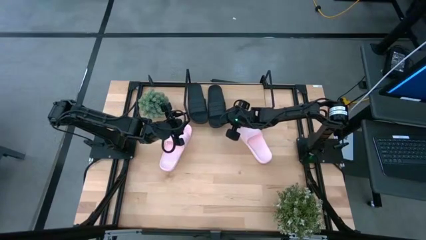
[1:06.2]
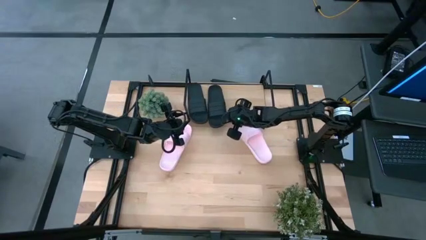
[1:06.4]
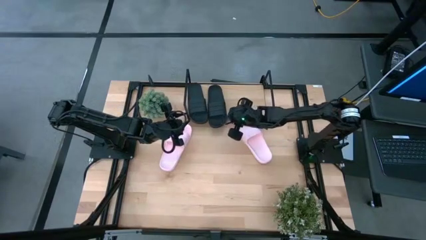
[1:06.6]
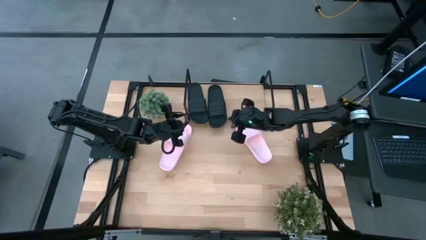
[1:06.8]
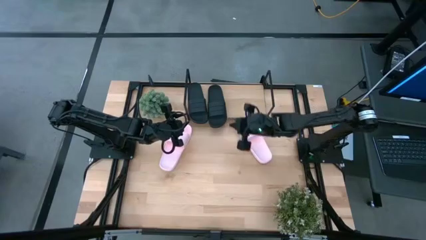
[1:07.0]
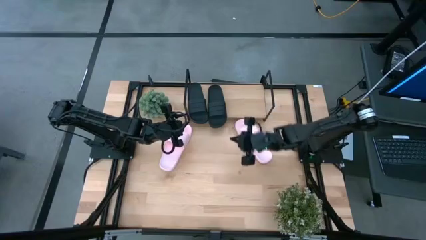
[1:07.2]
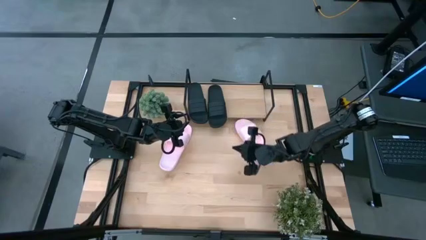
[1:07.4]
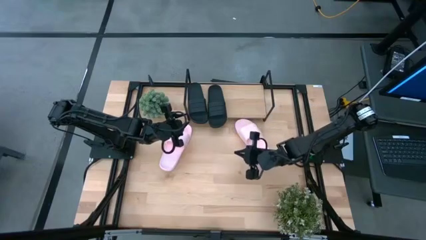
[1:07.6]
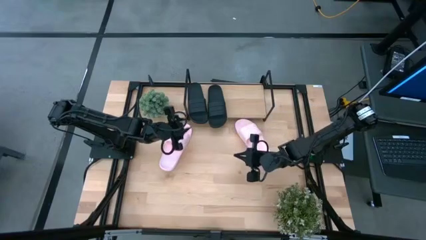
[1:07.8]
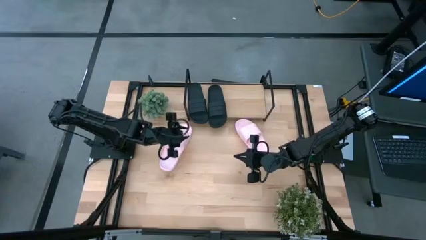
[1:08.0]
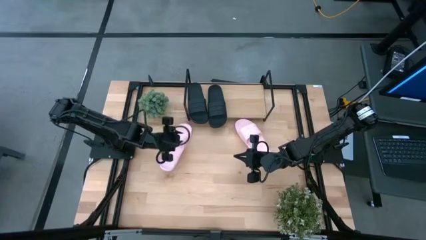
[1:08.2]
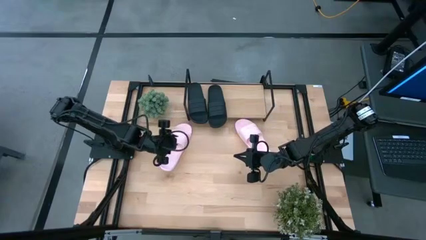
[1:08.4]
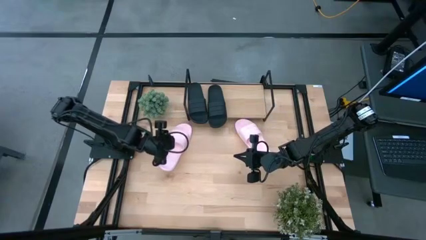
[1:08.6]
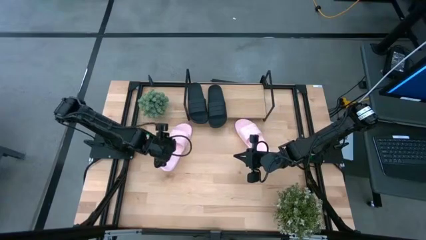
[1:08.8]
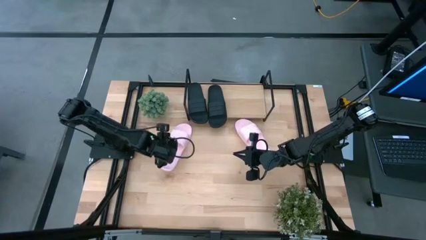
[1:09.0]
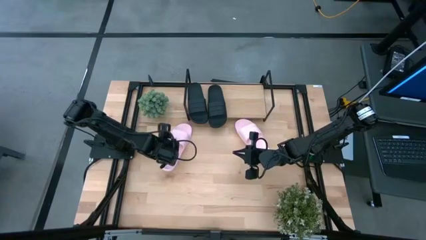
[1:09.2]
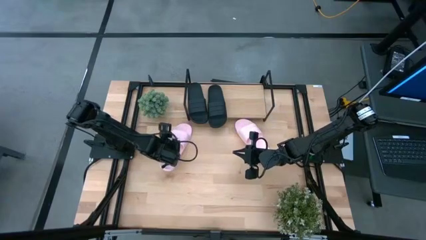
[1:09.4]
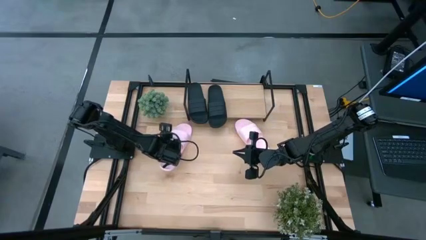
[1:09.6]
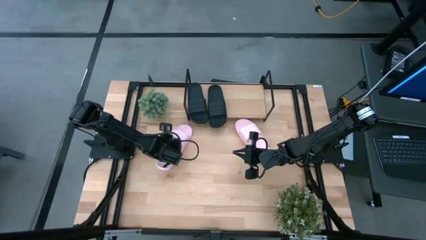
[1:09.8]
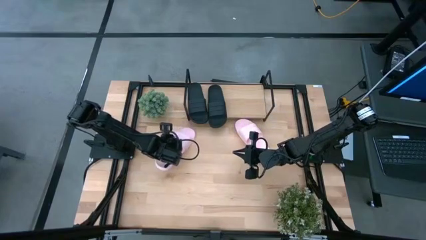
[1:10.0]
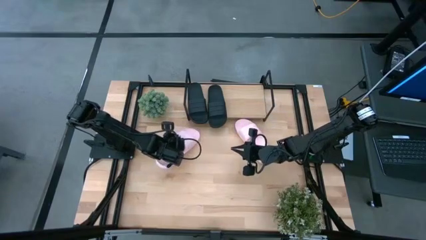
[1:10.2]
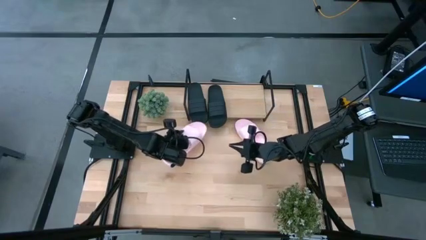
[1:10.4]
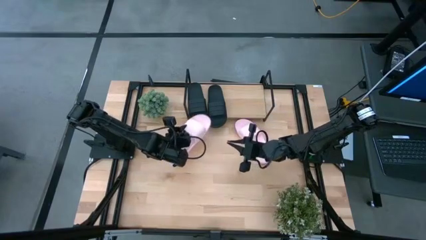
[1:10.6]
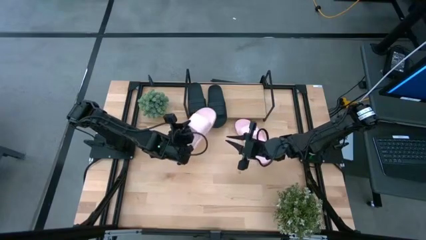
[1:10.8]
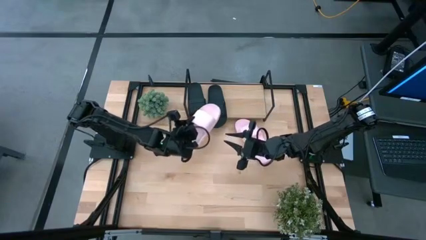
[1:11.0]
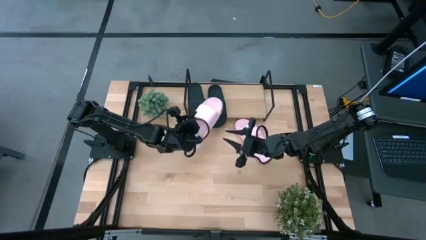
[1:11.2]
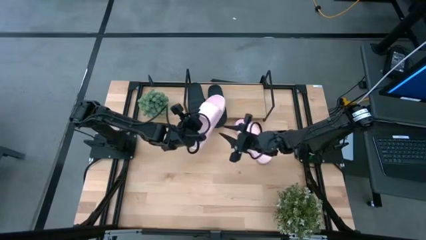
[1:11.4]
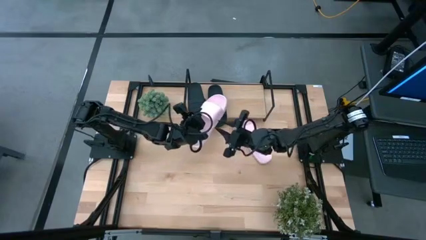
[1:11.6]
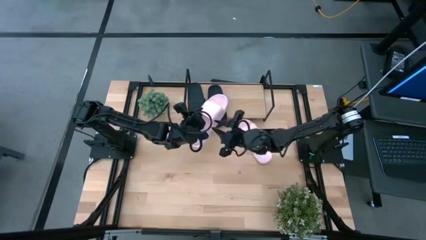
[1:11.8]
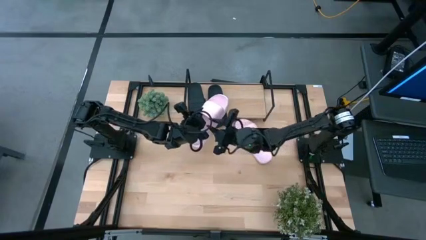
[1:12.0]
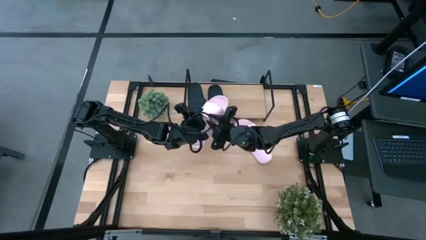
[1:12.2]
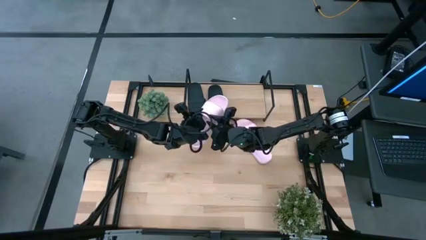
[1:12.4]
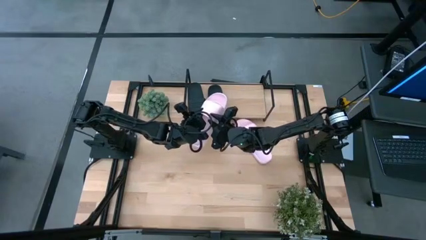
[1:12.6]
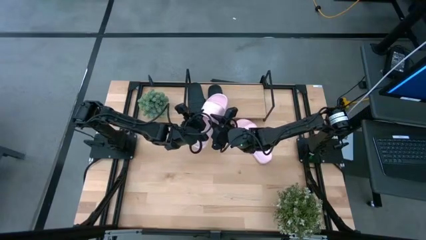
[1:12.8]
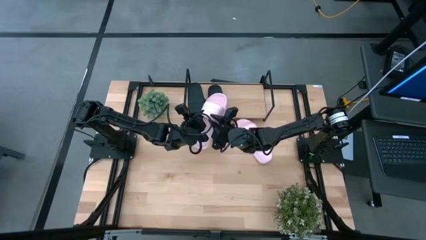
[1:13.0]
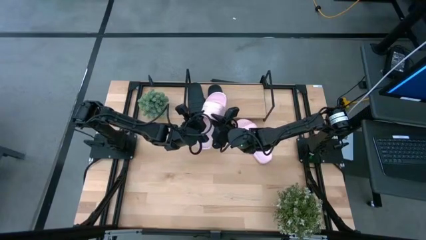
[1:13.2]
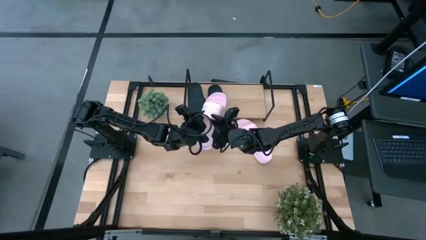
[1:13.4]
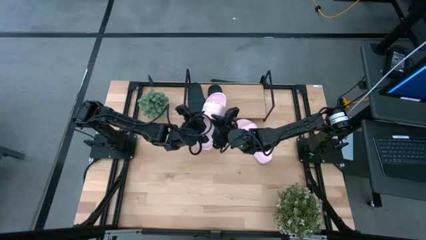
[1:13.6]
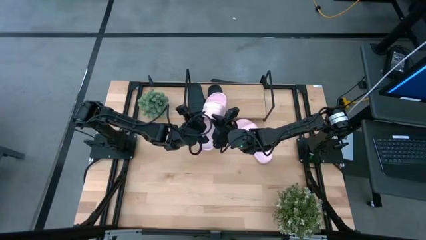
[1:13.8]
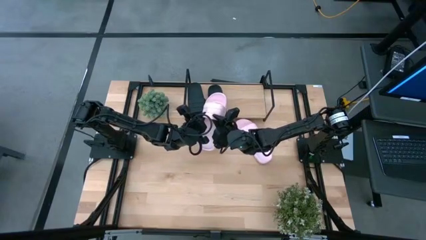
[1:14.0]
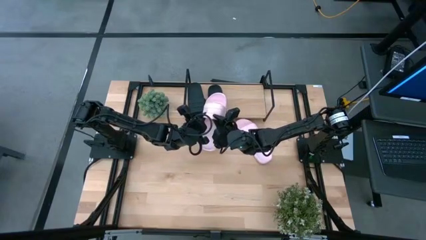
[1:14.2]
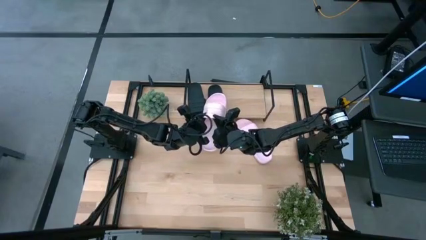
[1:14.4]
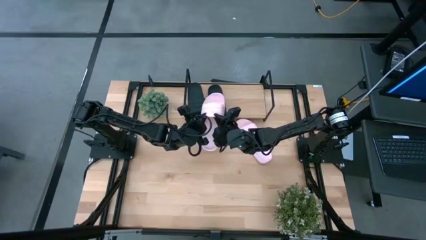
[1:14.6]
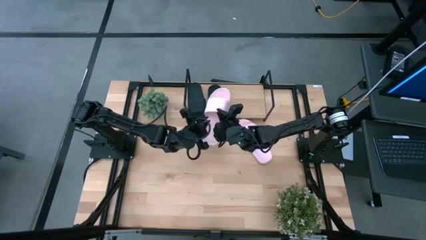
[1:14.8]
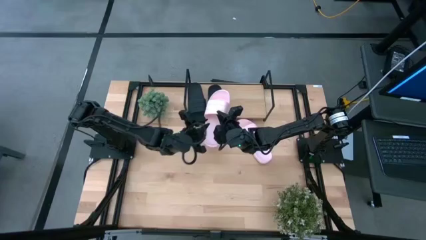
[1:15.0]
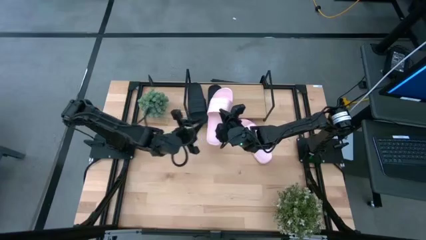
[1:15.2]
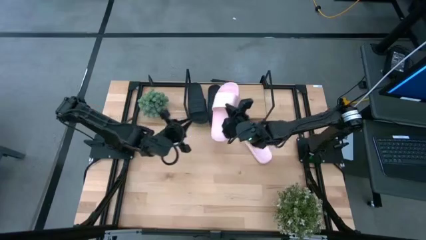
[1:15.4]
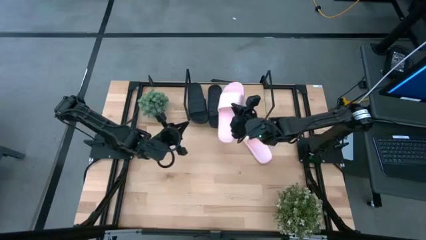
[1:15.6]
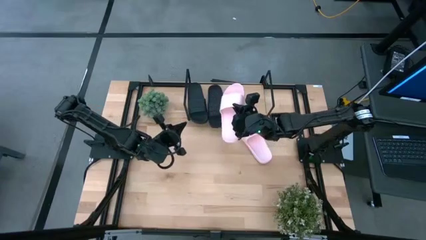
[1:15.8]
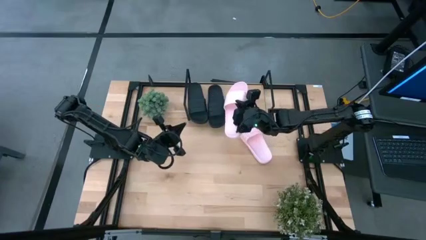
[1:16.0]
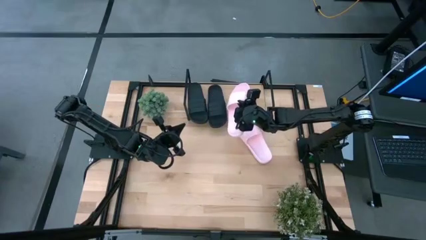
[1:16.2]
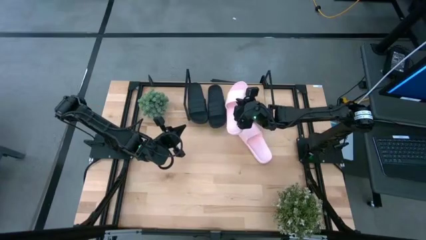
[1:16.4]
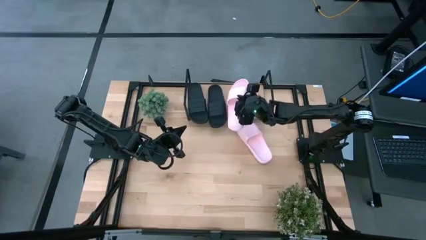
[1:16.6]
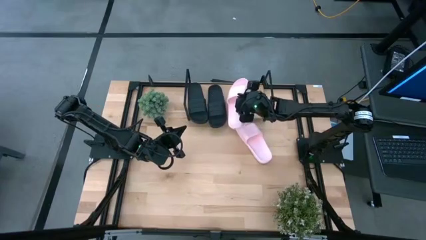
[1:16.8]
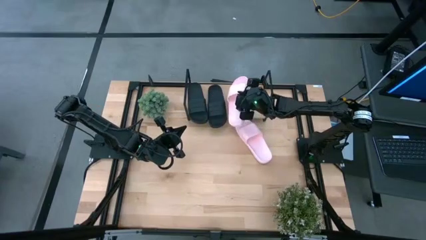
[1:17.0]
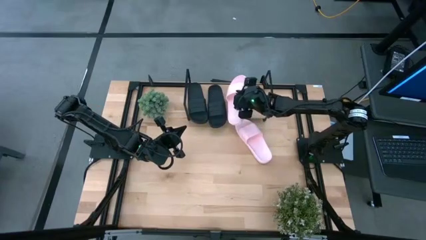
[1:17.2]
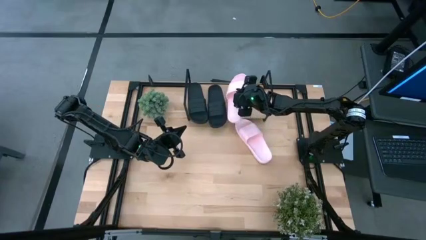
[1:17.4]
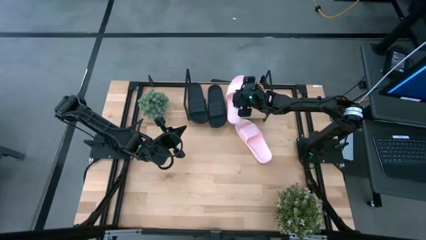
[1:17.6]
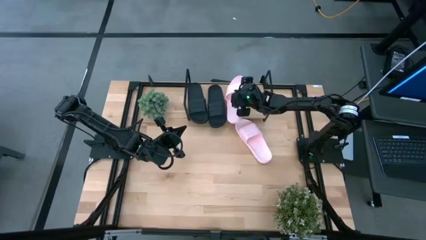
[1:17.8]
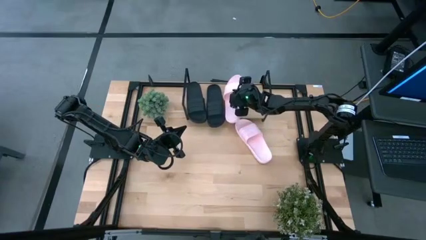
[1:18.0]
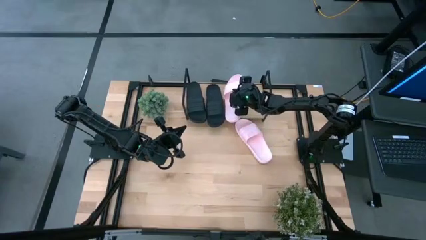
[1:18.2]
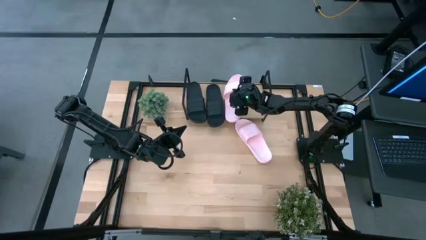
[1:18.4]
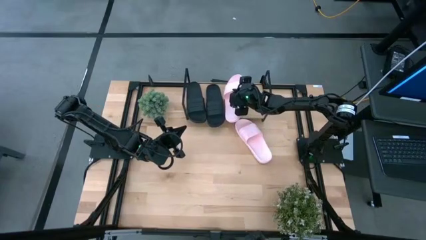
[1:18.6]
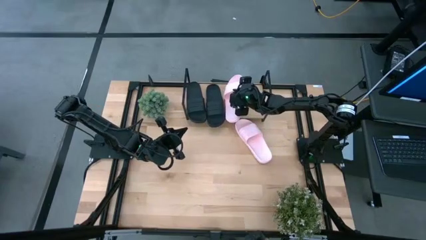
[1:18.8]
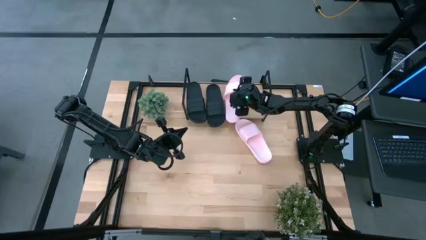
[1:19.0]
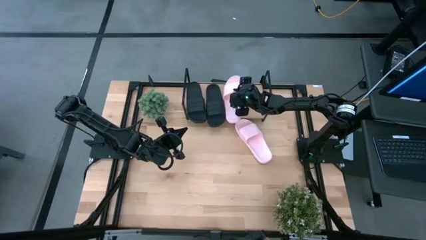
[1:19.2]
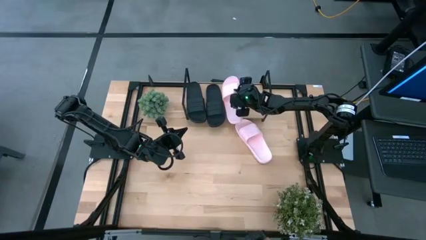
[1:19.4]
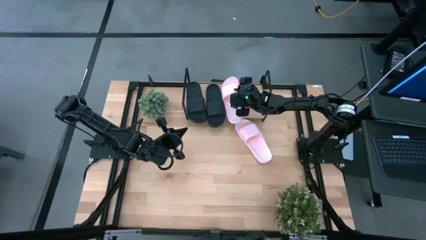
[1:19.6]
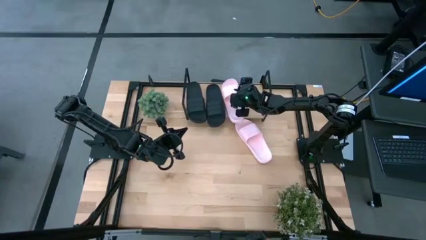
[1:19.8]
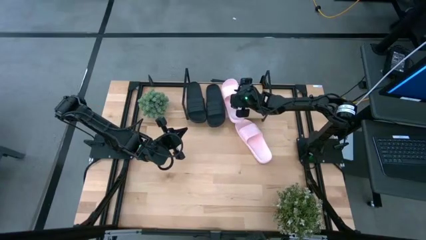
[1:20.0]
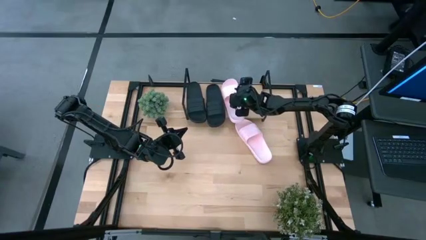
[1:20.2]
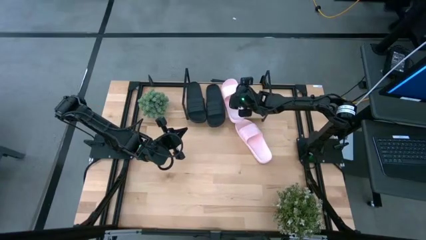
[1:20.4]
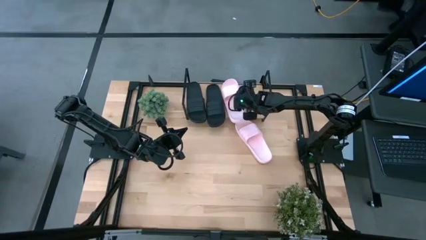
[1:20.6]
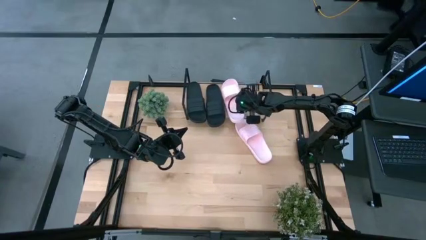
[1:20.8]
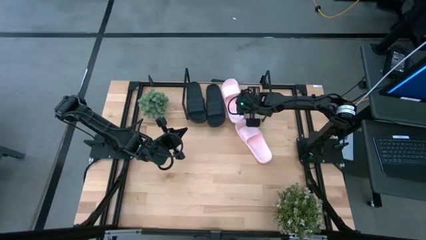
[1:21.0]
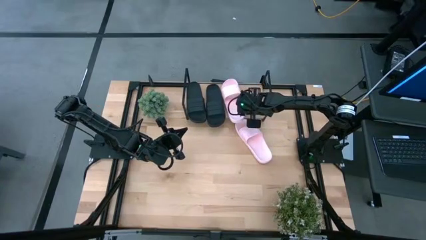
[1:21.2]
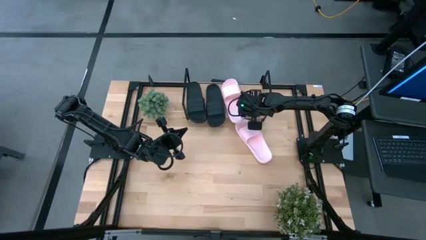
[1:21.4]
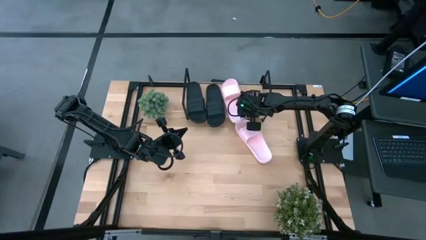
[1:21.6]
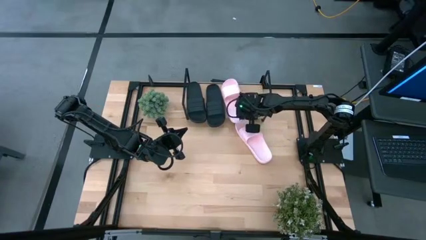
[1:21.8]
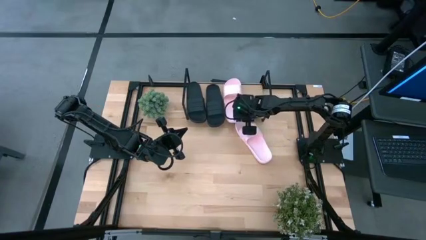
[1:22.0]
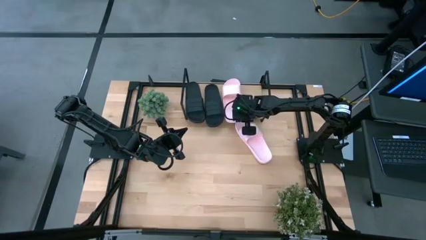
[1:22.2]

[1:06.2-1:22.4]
Task: Pick and place slides into the shelf
Put the left pink slide on the shelf
